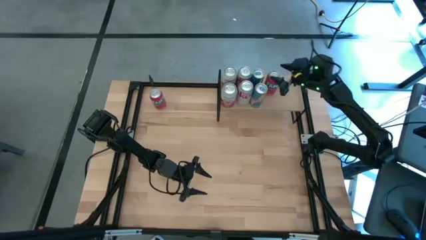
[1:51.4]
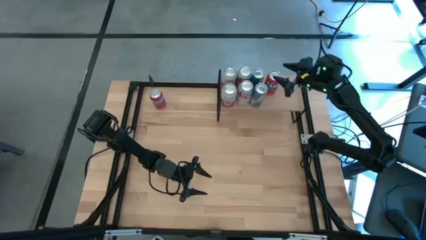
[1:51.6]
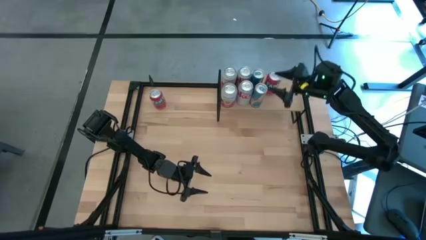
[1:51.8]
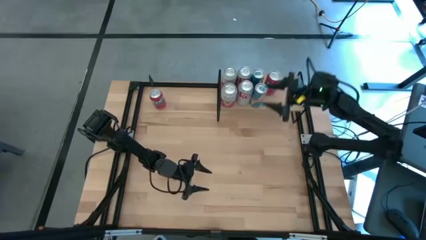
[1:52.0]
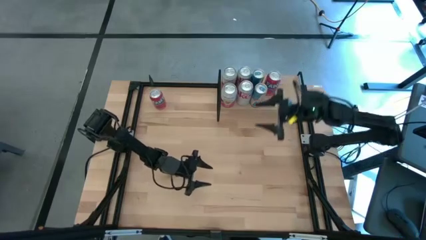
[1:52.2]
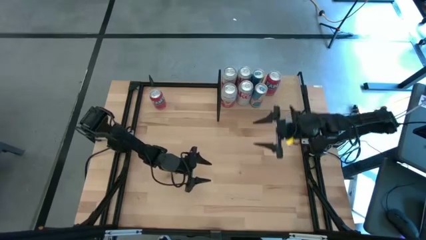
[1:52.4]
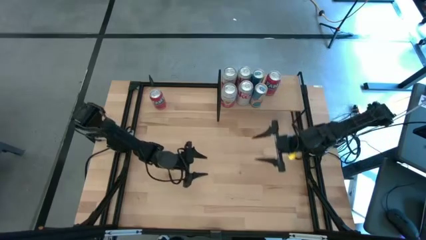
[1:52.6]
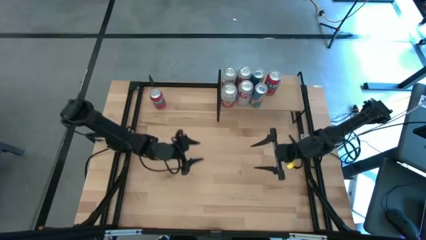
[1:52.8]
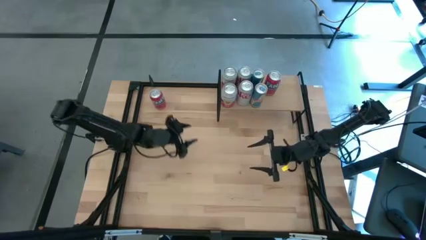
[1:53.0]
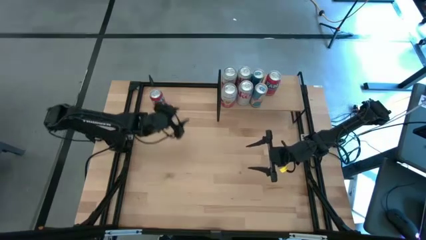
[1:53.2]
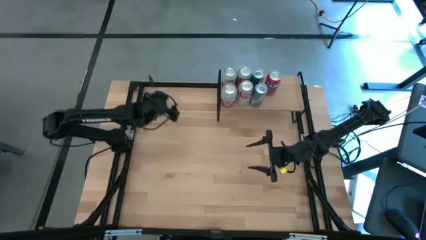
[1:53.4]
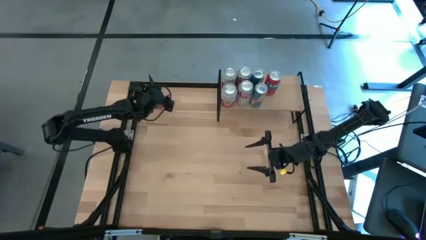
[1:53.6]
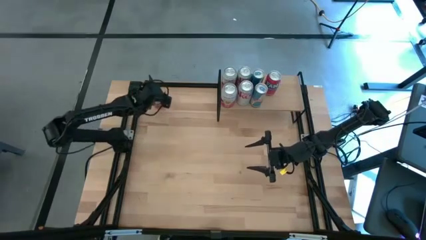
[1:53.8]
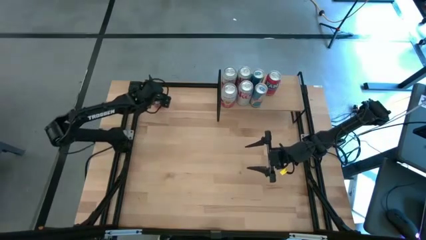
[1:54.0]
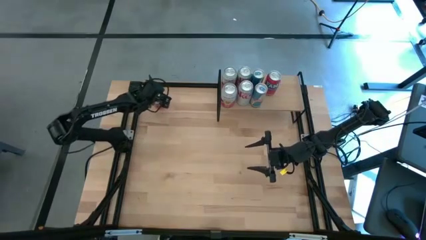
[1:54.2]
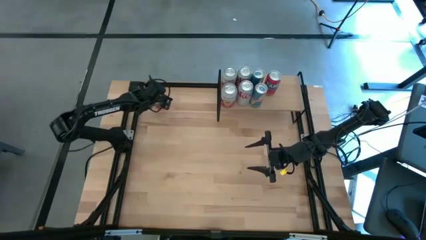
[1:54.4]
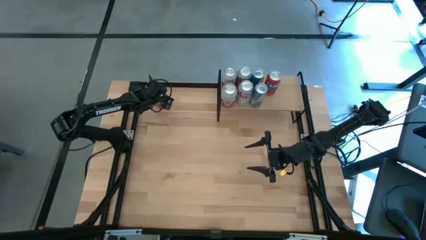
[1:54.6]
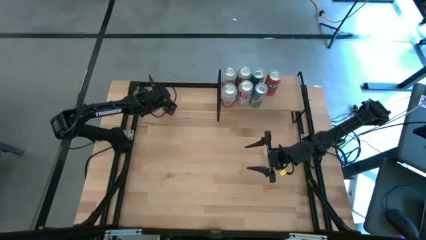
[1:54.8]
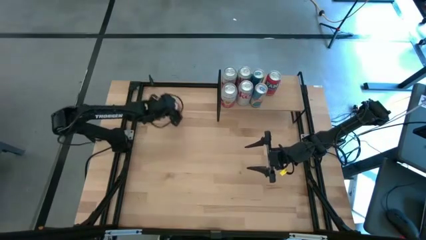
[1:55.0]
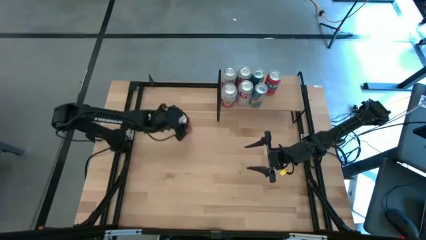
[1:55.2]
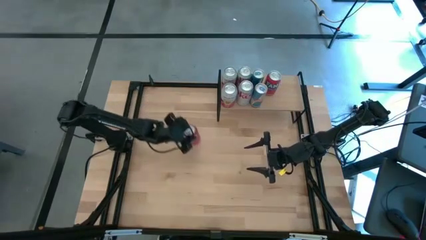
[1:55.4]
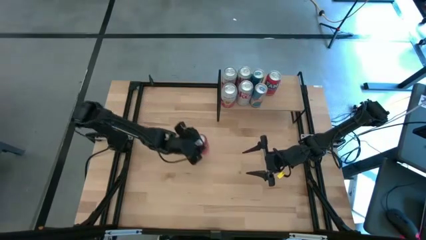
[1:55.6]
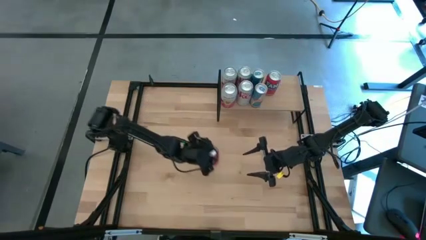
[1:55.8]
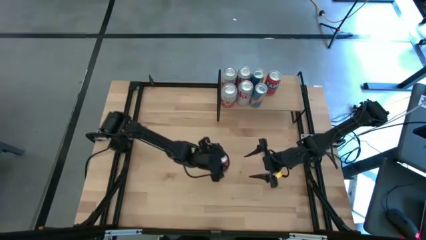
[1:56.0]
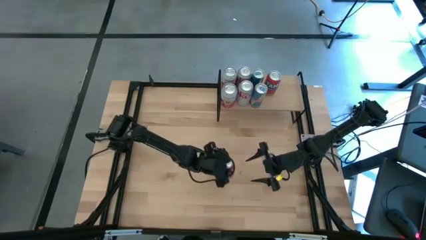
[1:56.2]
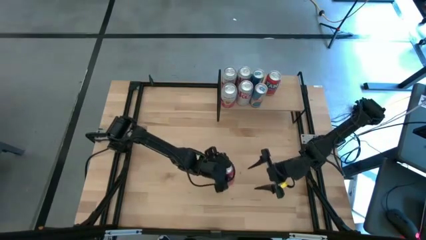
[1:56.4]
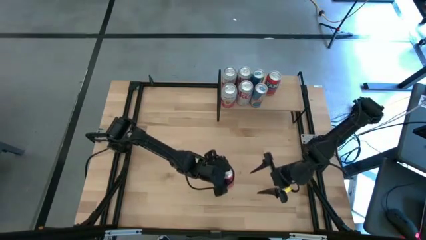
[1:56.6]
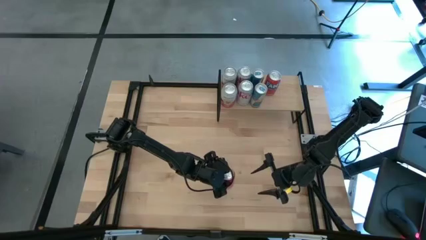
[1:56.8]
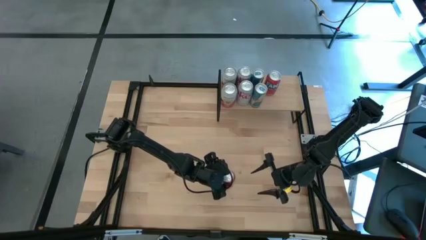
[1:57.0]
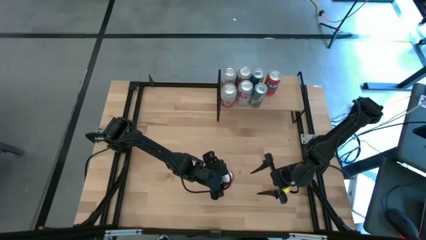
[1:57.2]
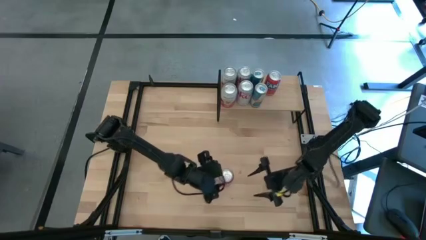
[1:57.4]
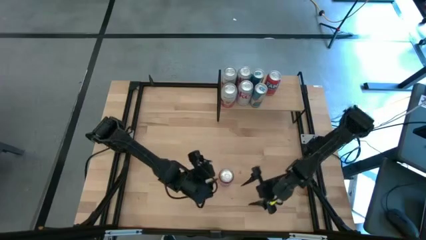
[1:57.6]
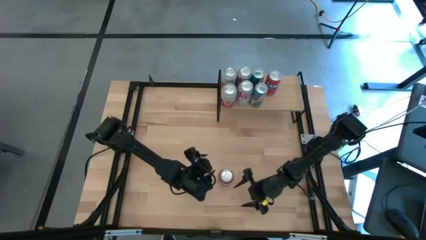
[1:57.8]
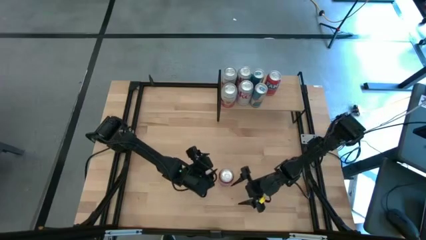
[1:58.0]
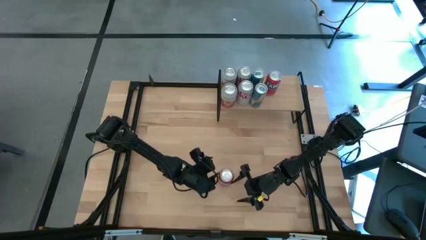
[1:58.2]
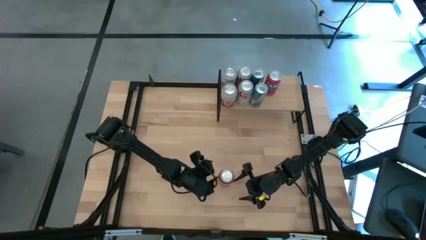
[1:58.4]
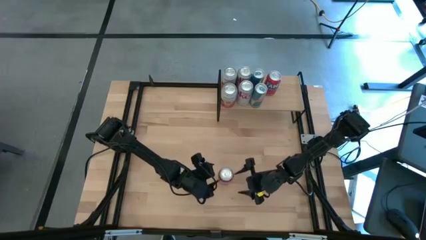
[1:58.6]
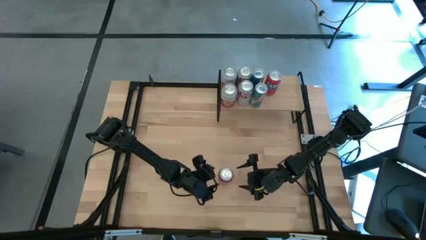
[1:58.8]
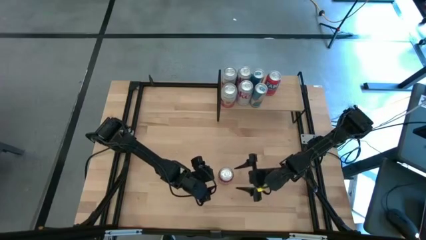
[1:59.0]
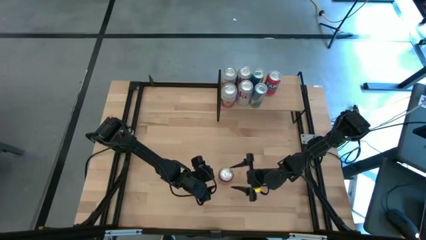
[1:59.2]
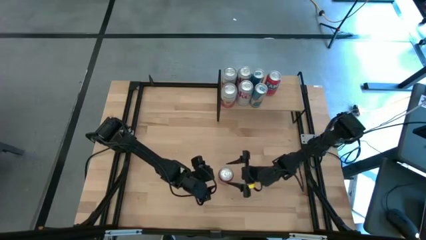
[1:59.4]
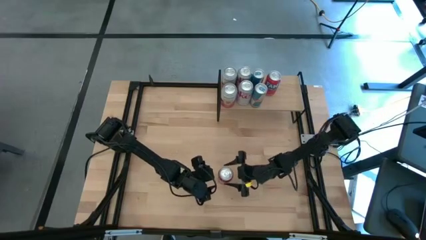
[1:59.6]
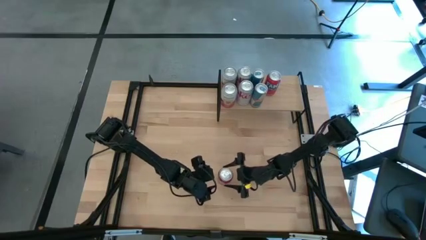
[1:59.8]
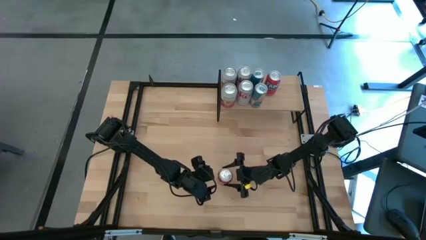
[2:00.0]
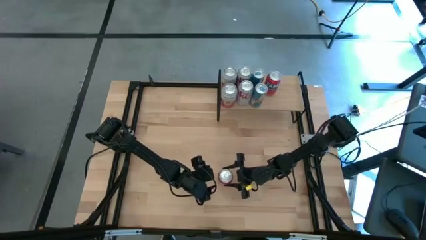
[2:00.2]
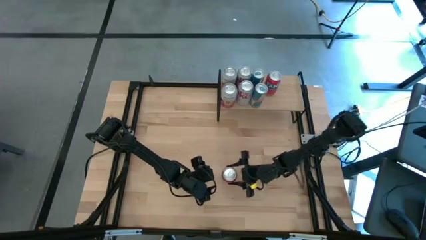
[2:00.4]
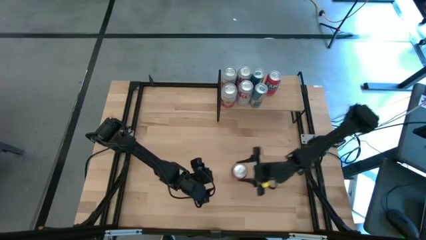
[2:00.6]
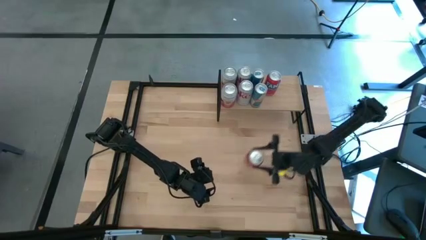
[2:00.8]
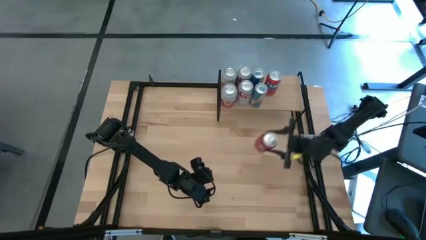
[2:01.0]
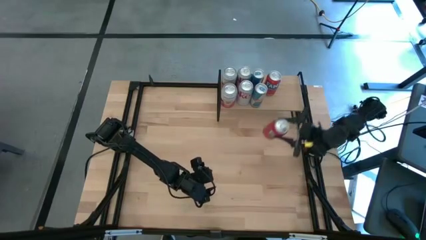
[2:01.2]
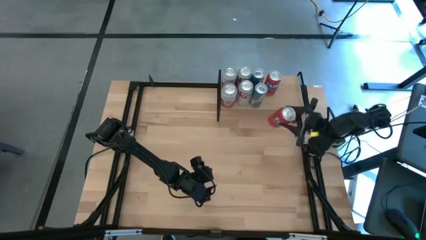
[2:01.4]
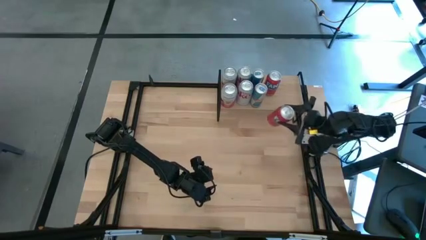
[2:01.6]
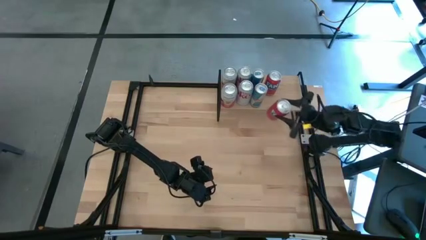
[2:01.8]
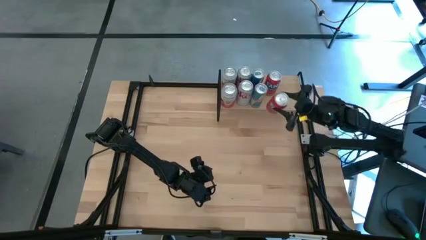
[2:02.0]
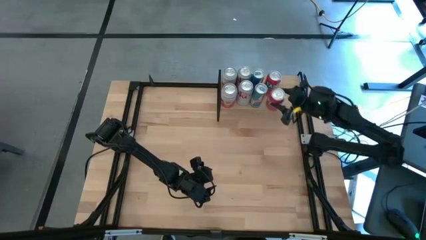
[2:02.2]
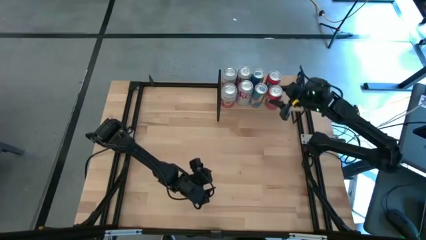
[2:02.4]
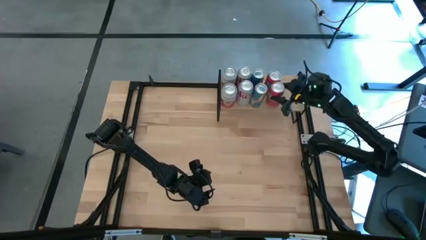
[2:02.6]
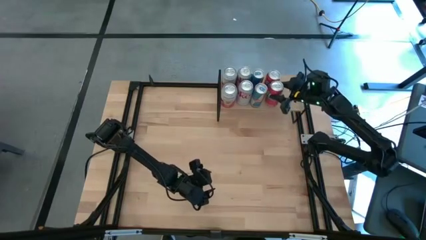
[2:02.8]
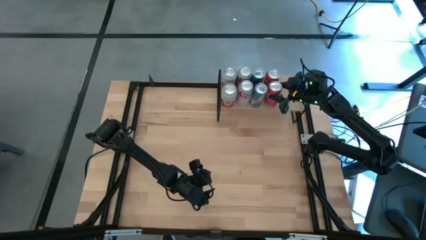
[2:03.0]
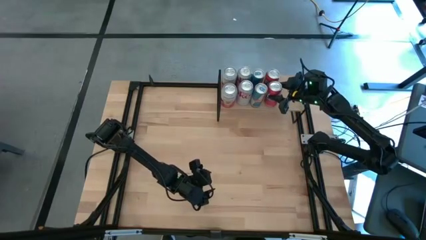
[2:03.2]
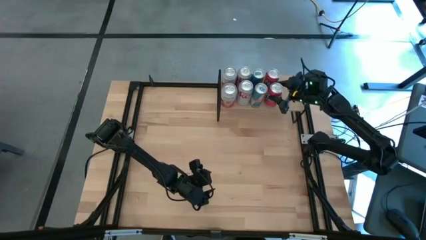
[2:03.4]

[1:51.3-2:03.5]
Task: Place canned beverage on shelf
Put the red soda can on the shelf aligned with the other red soda can

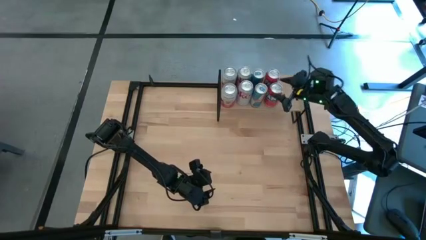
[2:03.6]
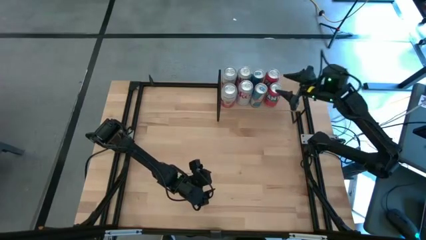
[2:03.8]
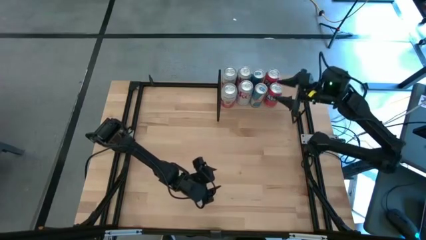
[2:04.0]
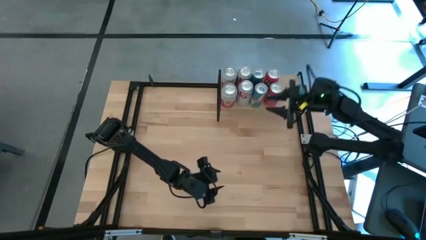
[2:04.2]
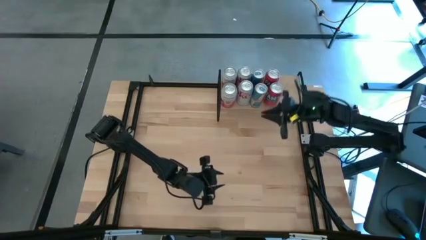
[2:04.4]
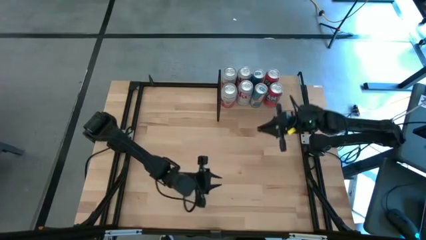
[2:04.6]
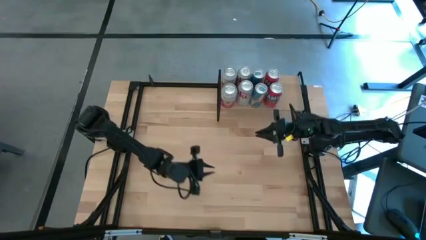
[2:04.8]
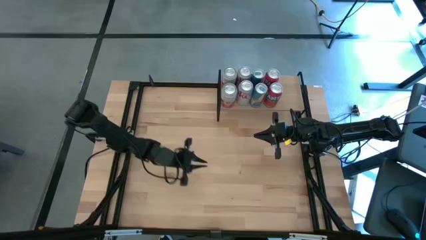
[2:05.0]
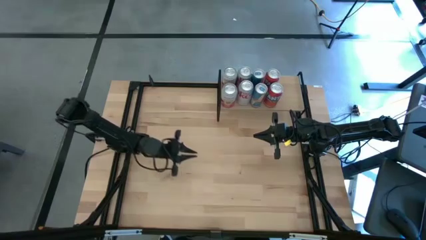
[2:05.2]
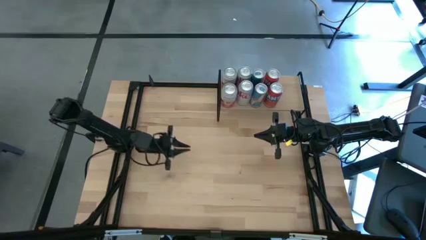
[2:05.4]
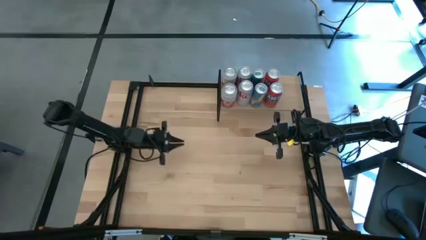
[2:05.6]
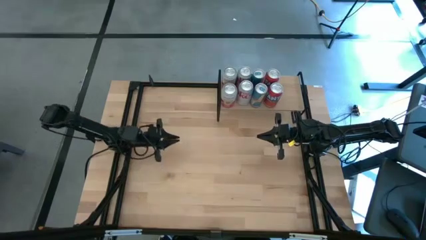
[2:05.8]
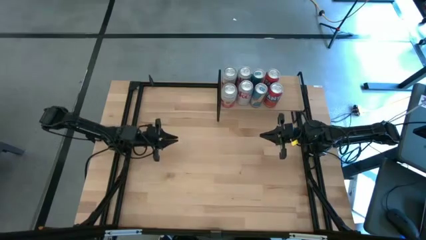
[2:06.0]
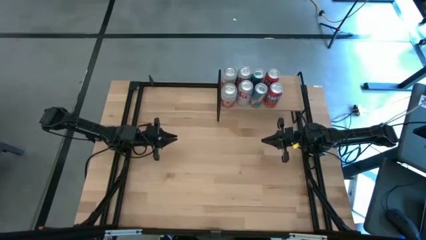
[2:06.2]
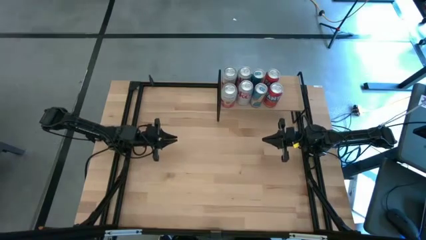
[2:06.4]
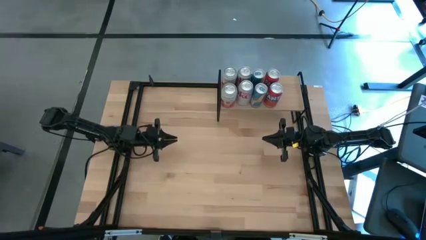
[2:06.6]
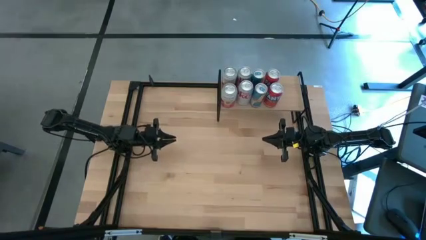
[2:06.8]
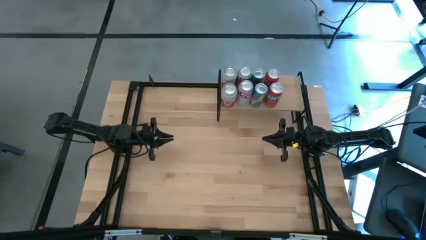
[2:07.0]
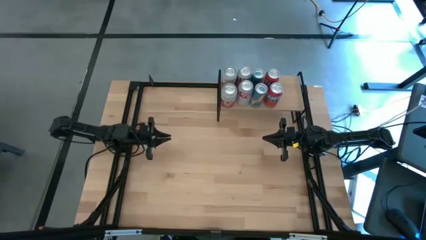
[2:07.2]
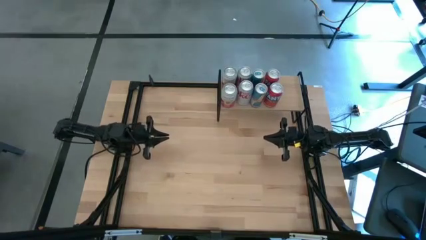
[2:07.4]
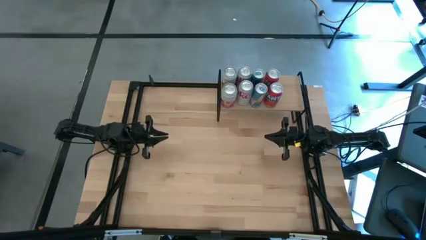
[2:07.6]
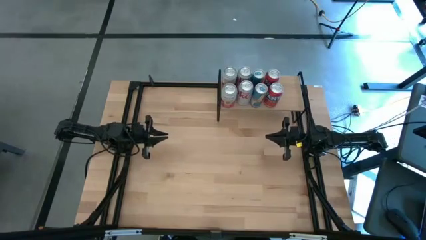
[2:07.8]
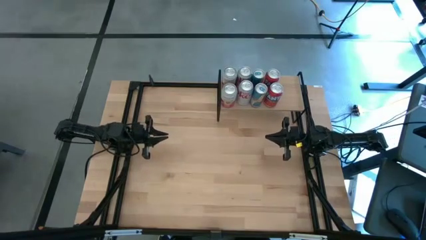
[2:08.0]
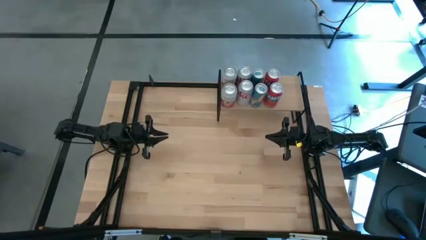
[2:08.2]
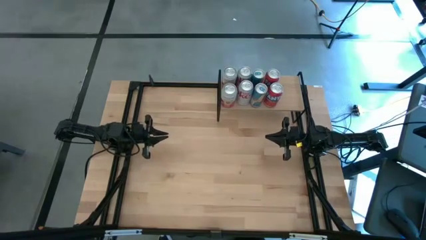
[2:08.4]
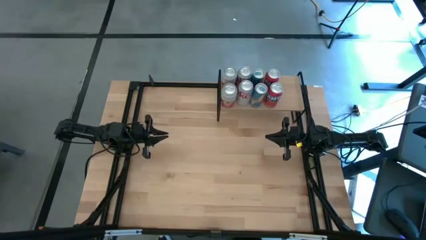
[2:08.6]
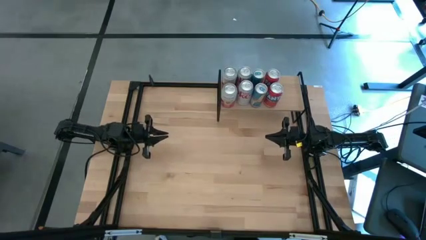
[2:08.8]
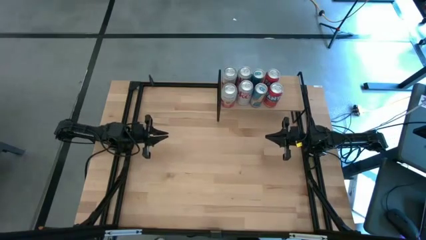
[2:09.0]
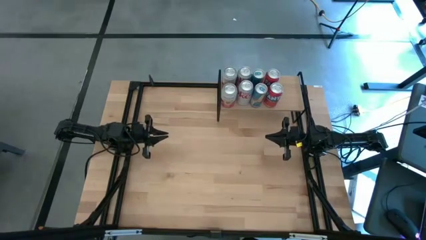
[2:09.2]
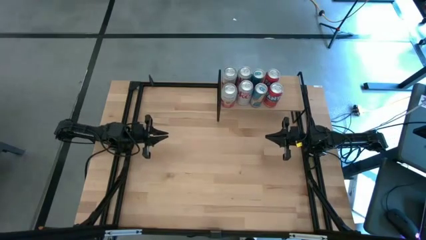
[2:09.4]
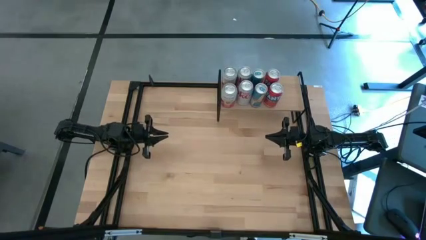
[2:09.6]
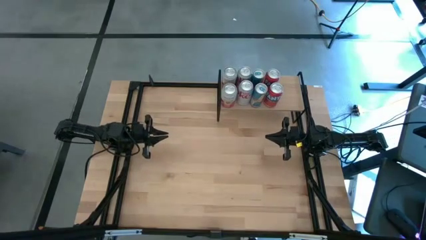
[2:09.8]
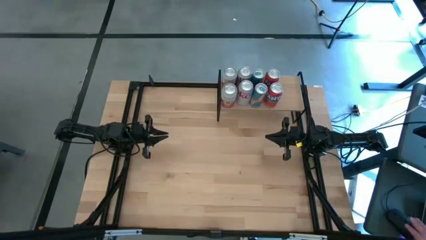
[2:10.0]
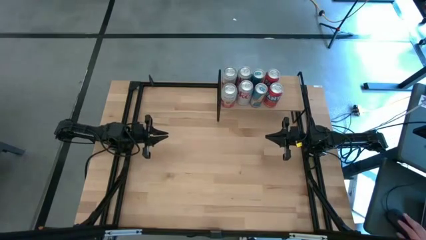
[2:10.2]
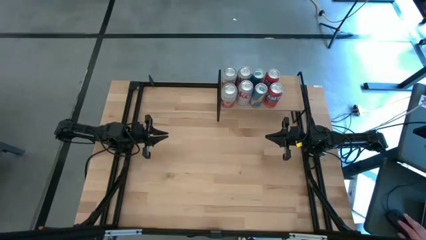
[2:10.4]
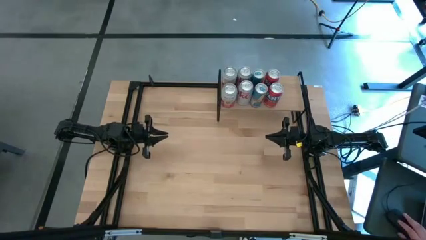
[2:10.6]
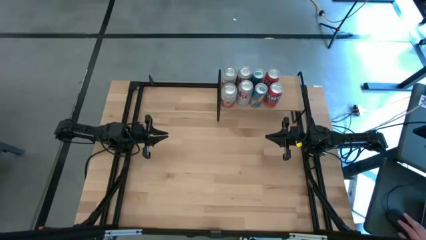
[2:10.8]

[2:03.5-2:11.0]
Return to Home Position
